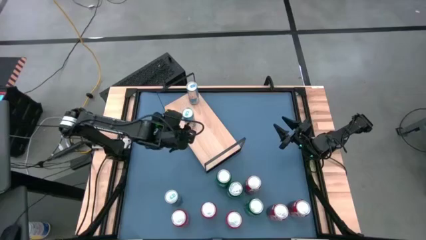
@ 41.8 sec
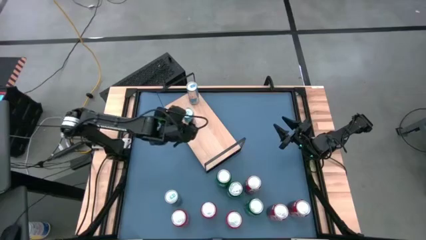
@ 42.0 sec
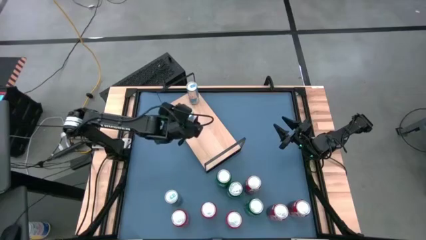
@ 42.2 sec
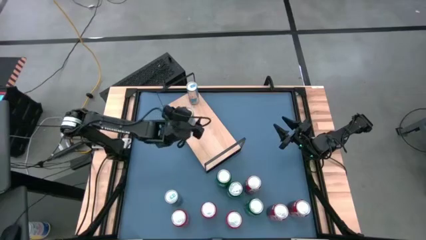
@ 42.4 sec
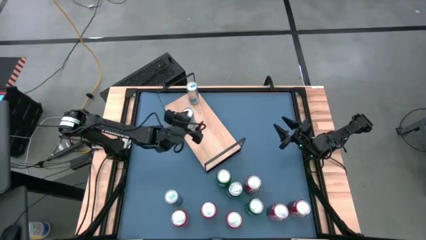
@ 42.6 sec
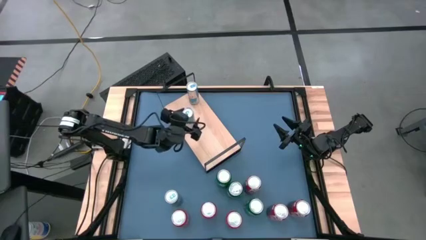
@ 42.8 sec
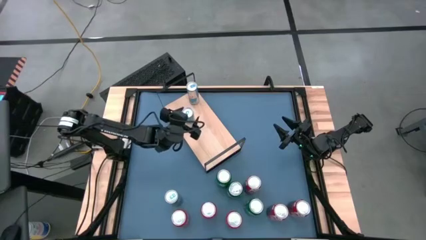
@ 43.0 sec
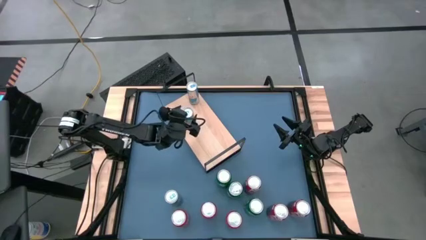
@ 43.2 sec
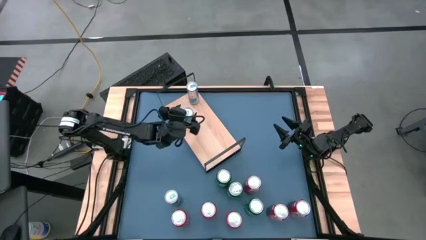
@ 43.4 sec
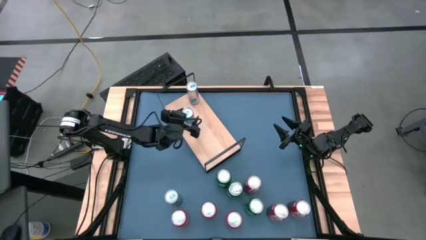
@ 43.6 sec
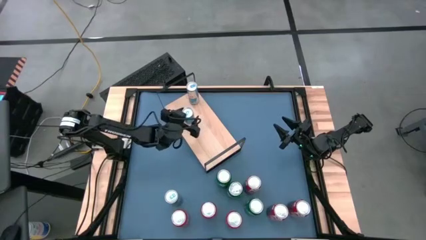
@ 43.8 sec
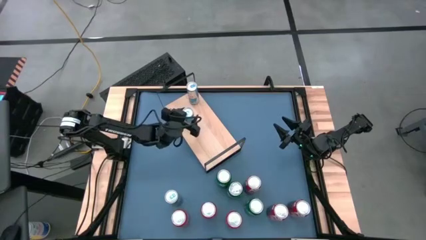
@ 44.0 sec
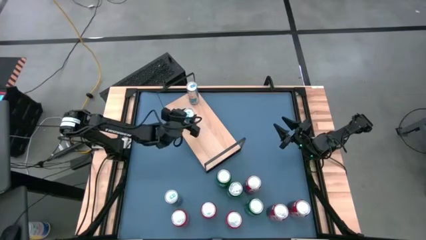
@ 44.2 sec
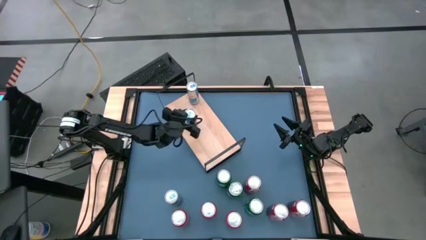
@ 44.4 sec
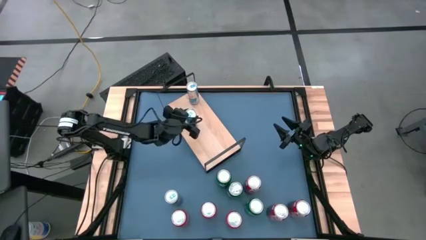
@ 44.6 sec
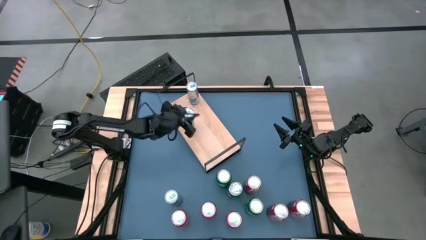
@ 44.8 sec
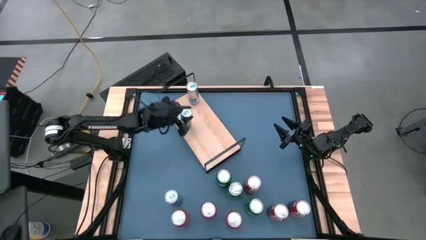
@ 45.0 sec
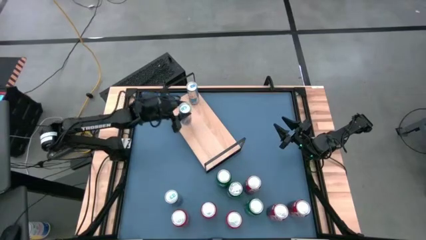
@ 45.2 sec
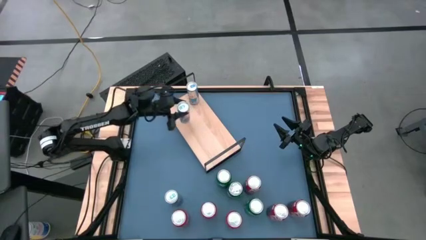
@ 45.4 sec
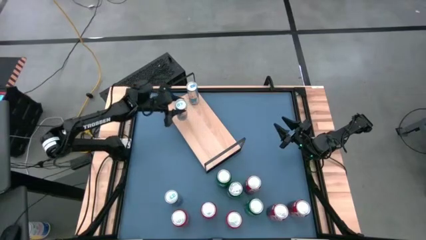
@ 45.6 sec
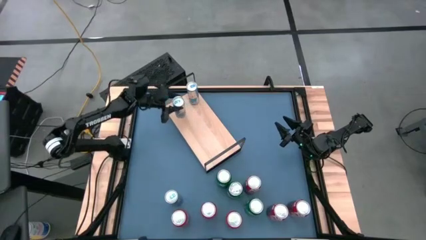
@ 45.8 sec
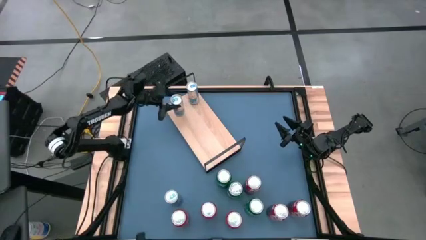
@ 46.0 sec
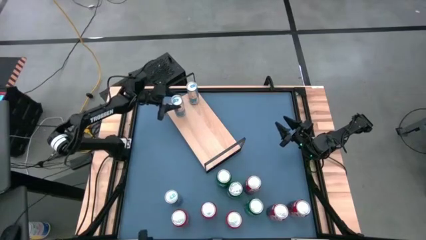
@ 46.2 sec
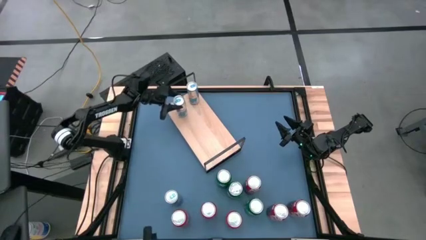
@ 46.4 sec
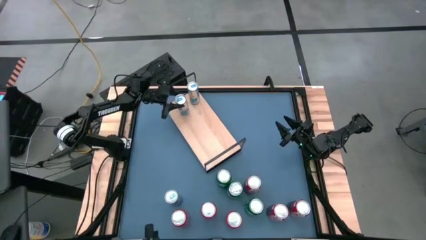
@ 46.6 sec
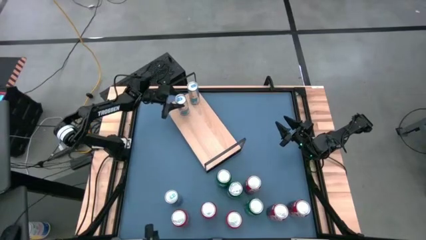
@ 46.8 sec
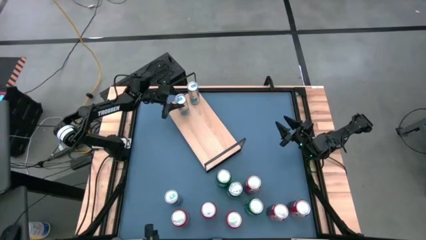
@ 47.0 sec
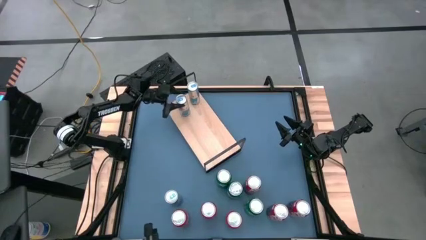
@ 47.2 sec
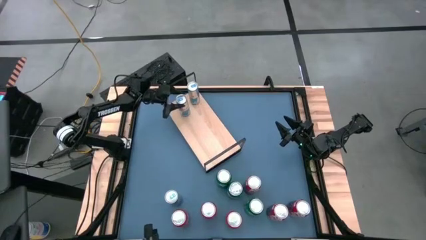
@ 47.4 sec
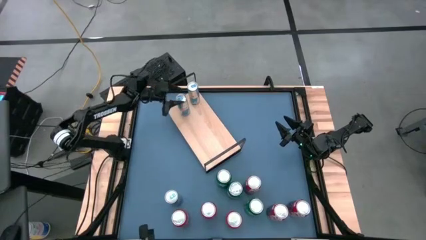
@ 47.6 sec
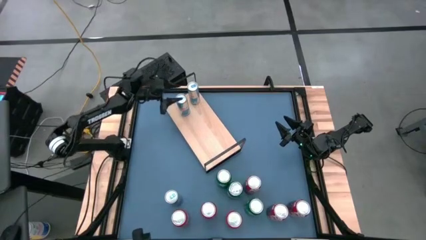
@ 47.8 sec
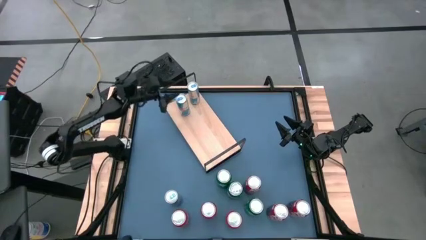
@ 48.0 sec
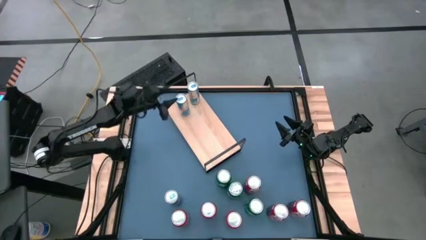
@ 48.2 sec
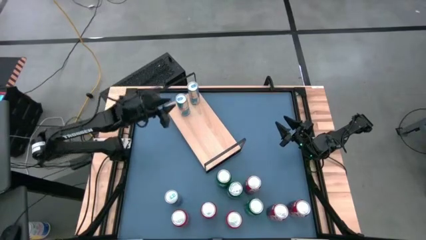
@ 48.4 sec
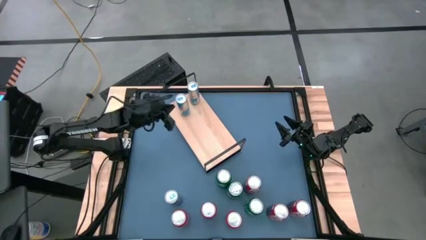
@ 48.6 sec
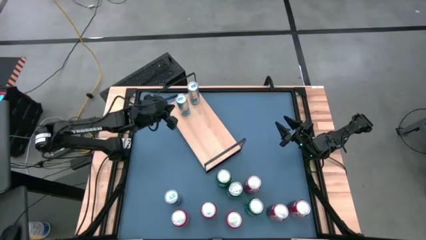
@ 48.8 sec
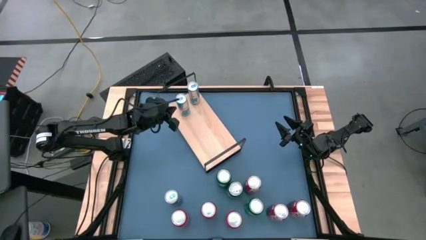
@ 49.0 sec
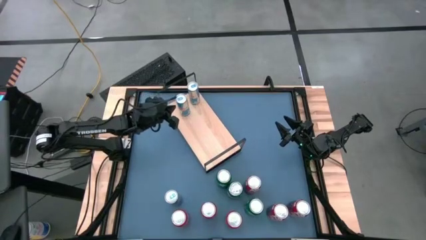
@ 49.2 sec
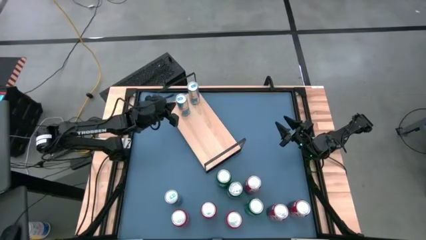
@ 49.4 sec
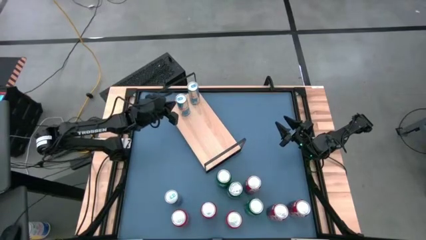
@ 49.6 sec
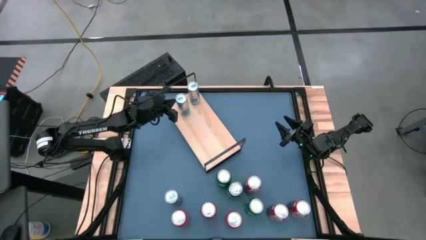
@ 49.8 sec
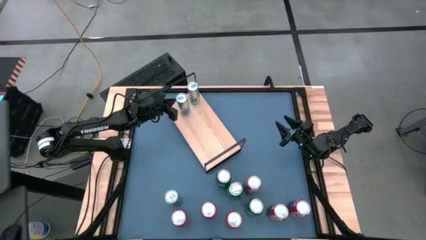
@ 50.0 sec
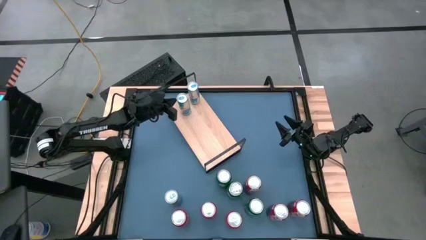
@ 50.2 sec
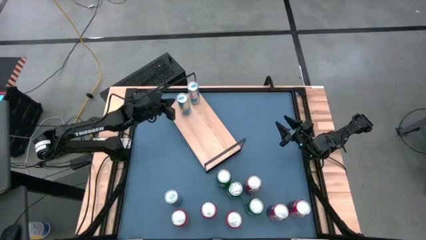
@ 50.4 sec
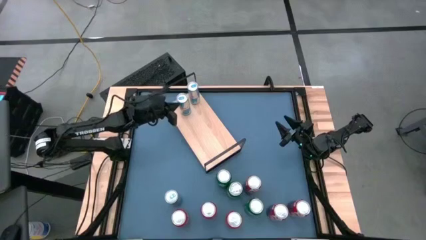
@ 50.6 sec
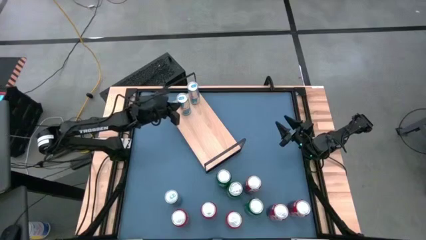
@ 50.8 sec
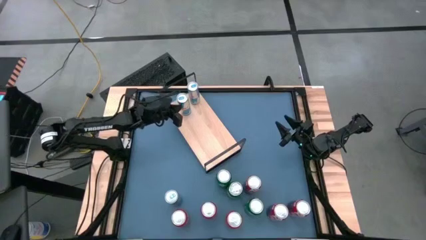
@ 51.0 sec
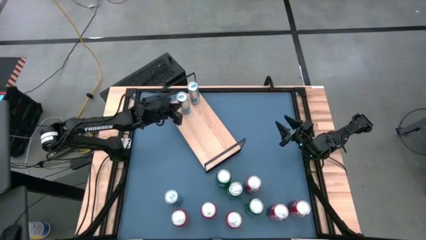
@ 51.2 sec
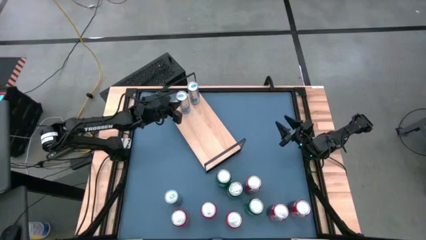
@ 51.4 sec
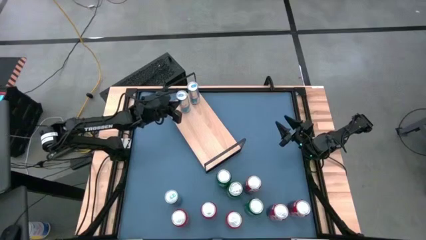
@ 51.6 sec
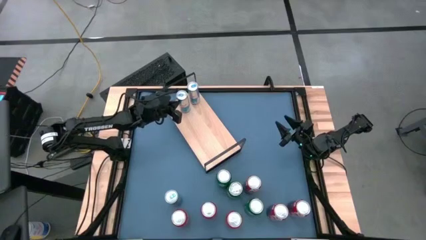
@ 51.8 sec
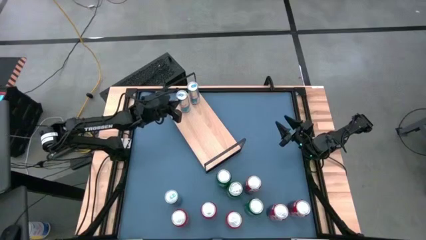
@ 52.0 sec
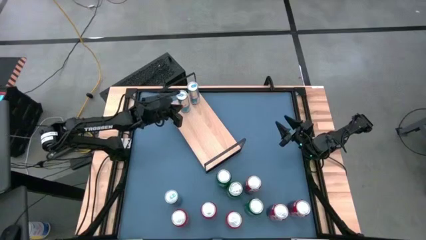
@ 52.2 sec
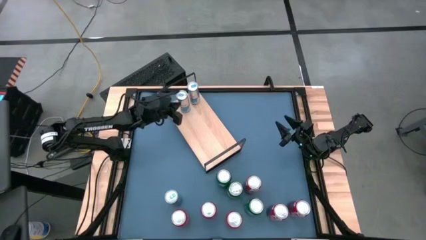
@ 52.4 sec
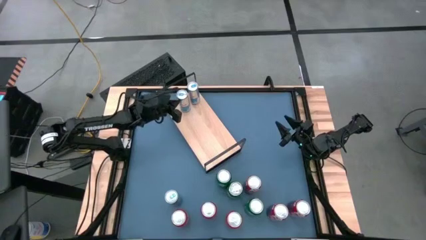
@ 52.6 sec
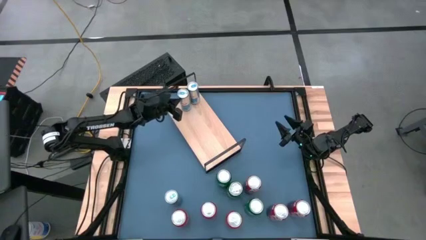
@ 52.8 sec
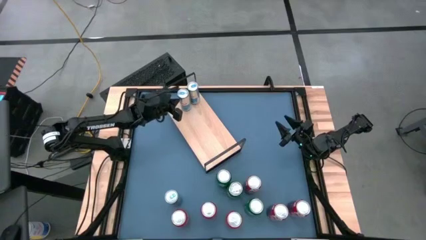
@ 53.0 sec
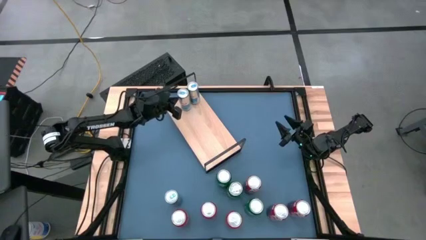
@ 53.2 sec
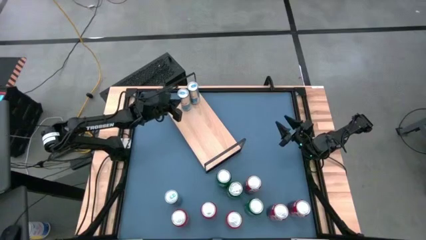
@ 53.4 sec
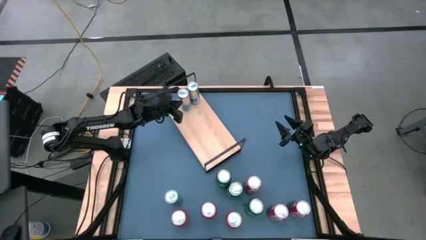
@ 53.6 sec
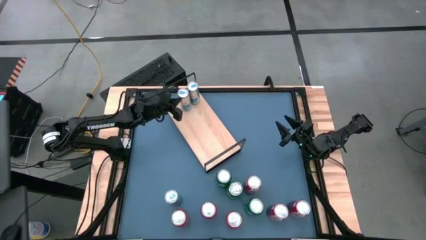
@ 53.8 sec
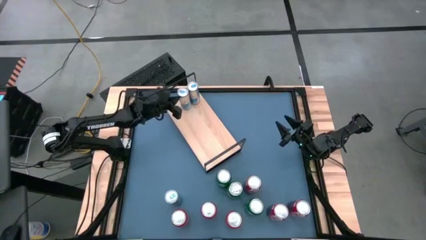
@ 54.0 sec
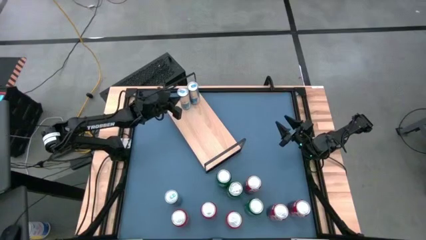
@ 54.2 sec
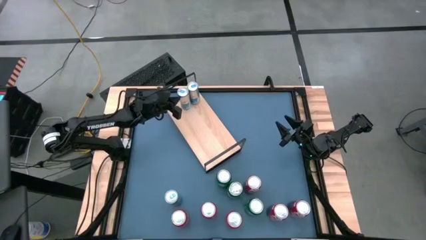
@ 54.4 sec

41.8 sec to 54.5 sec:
Task: Place canned beverage on shelf
Put the right blue soda can on the shelf aligned with the other blue soda can
